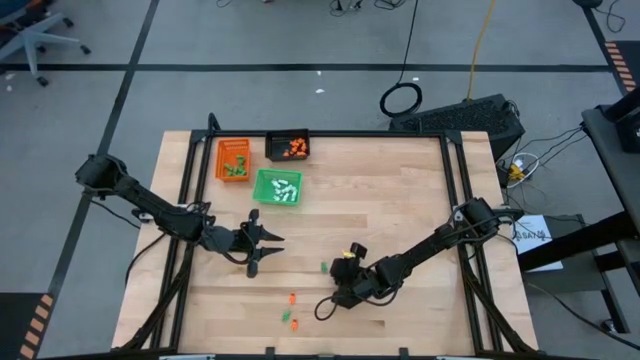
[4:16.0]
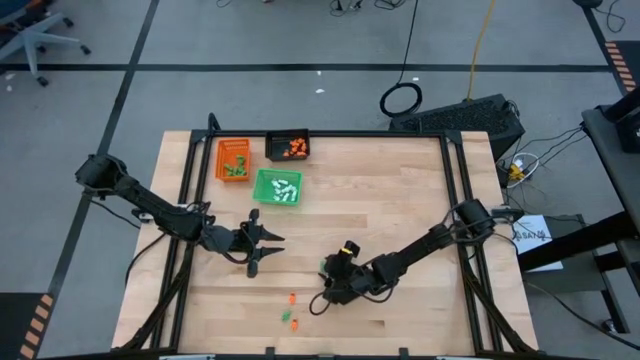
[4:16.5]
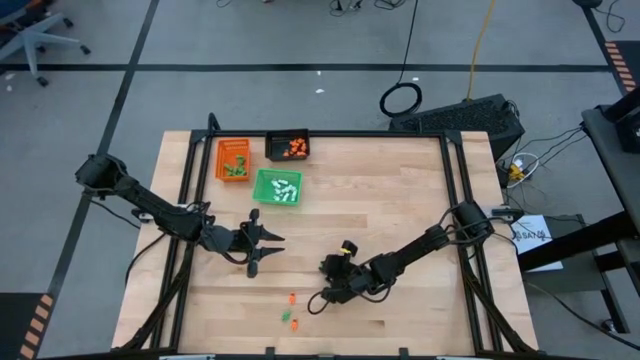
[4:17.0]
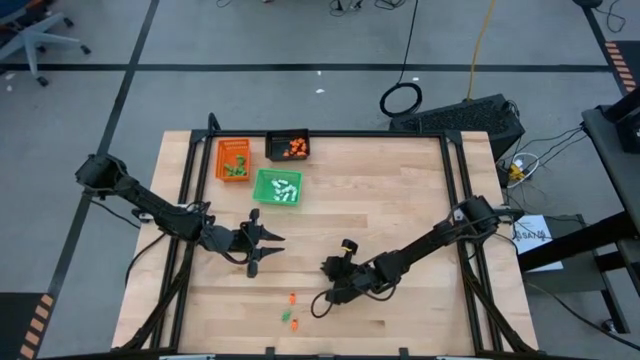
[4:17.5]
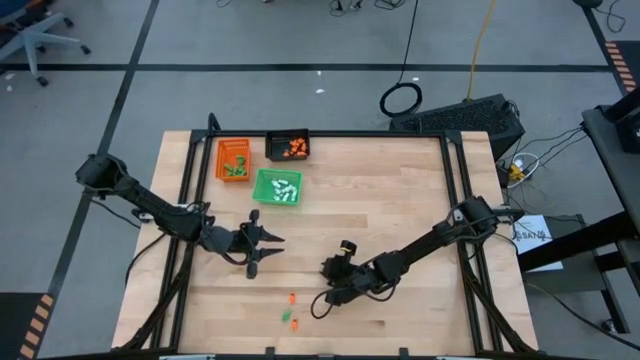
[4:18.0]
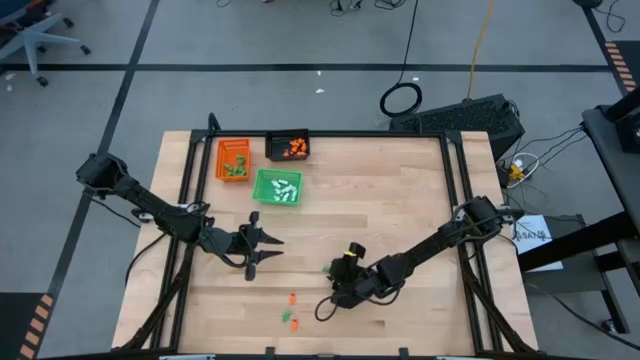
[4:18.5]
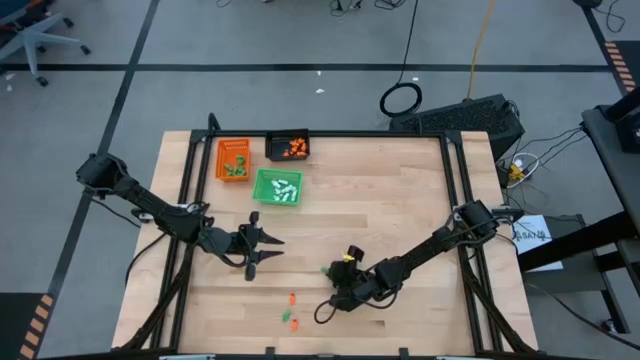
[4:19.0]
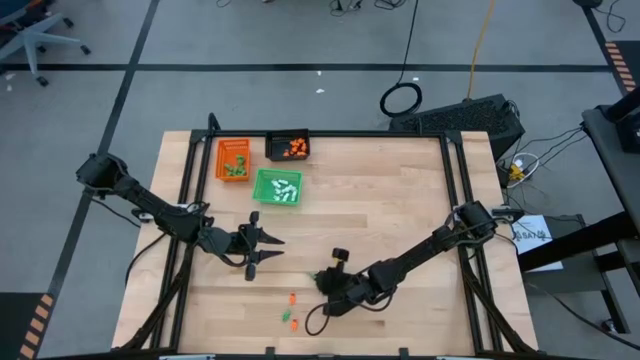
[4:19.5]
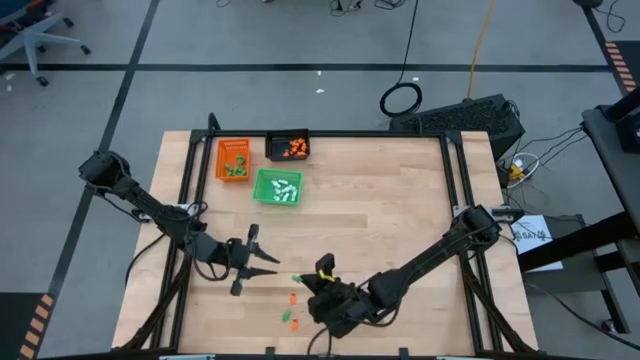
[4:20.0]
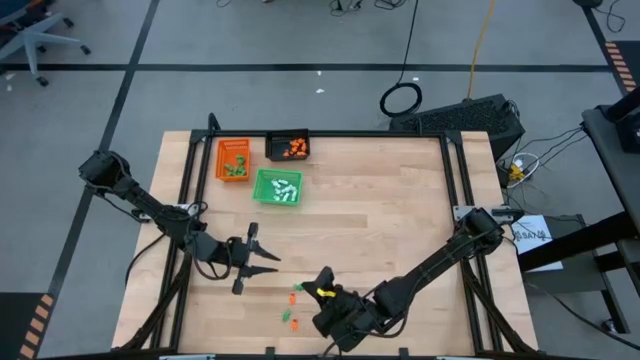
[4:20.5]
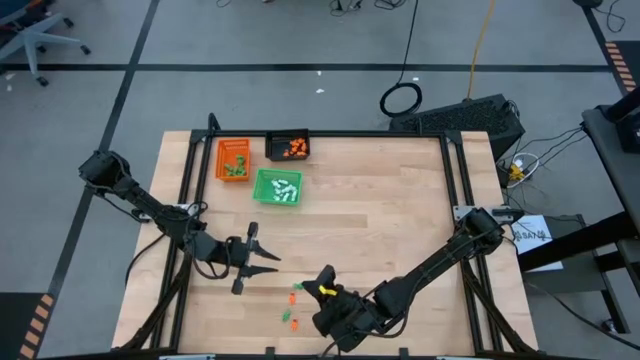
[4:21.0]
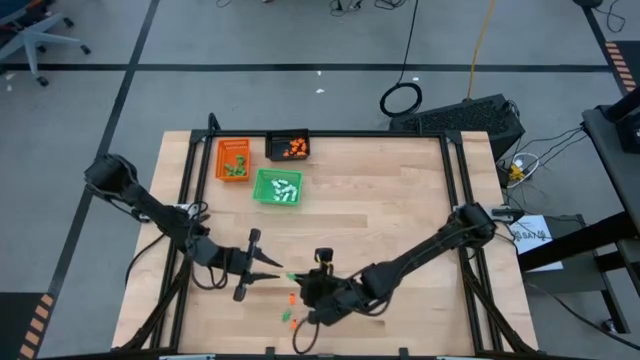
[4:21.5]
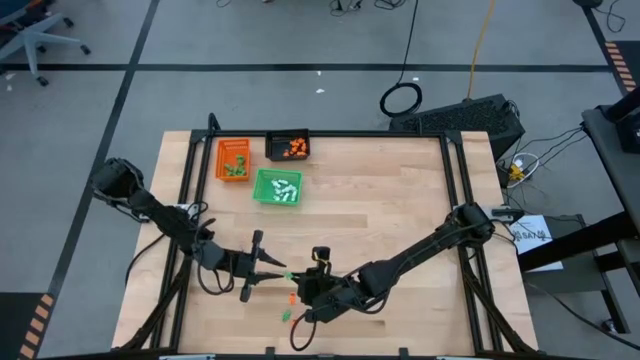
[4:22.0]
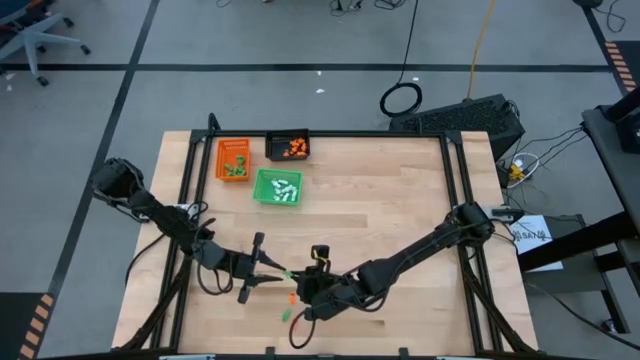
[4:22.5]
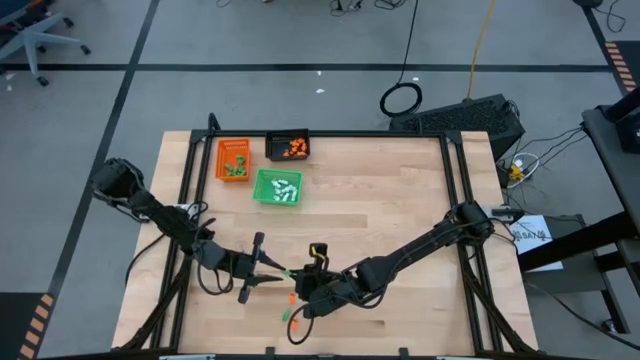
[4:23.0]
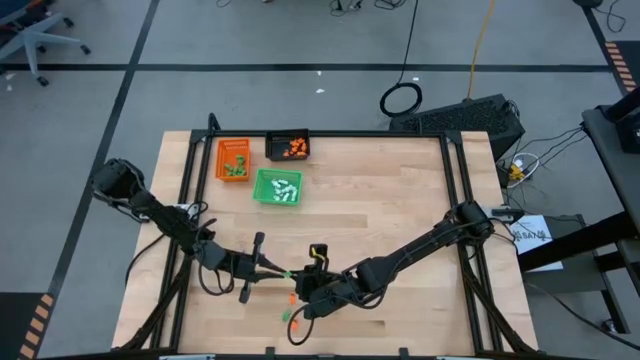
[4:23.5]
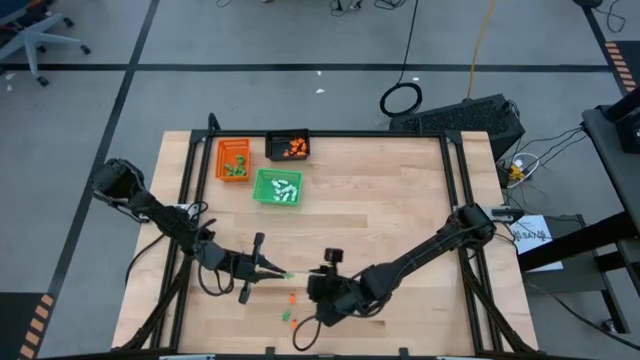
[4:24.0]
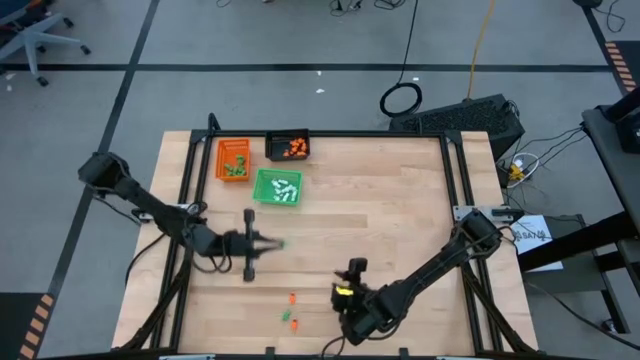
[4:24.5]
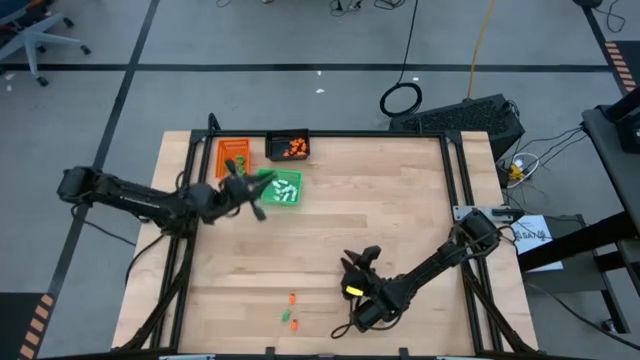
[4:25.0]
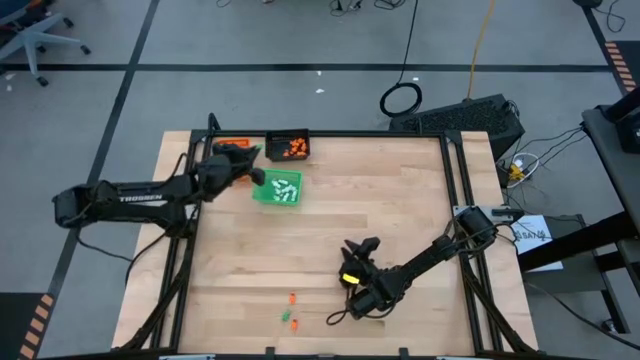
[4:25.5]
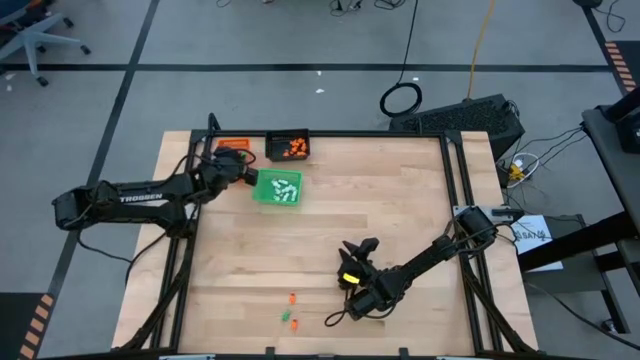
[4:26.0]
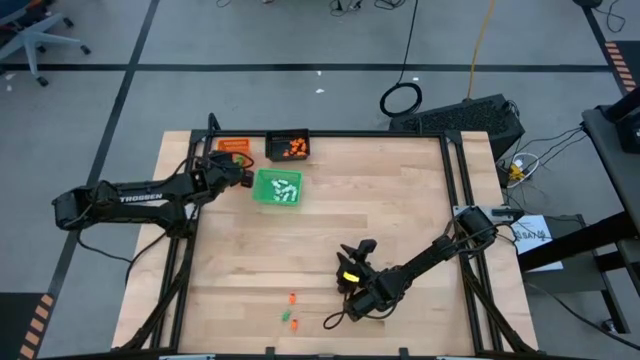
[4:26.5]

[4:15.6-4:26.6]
Task: Sort Halloween decoration
Put the green skeleton toy into the orange bin

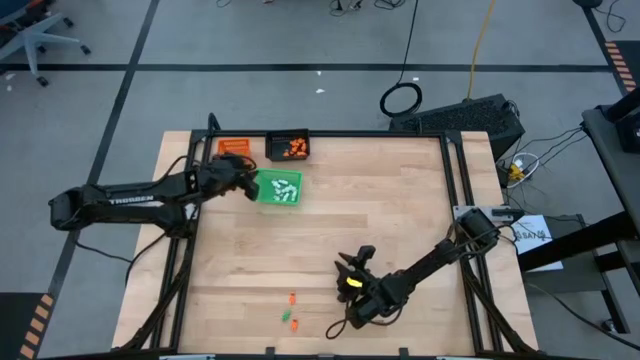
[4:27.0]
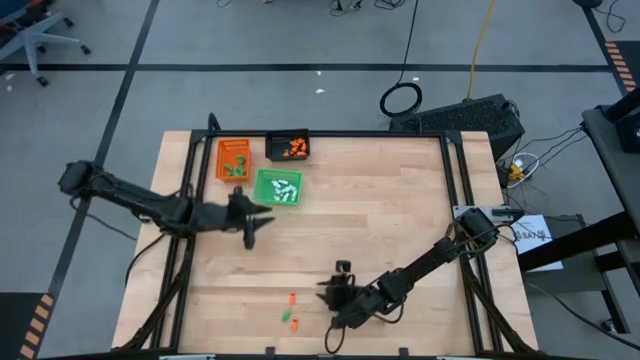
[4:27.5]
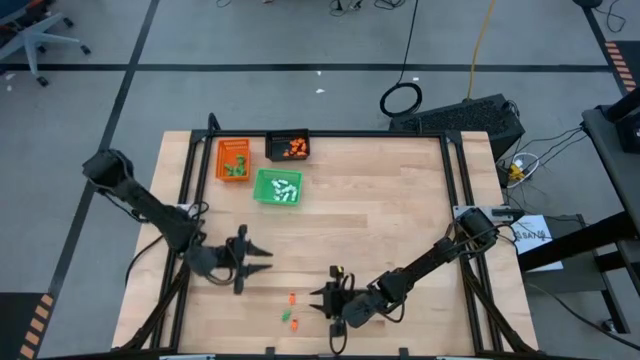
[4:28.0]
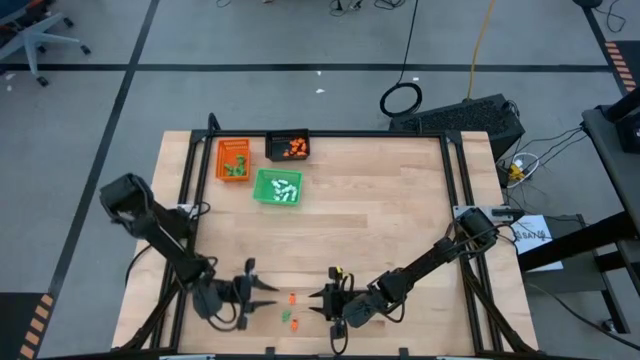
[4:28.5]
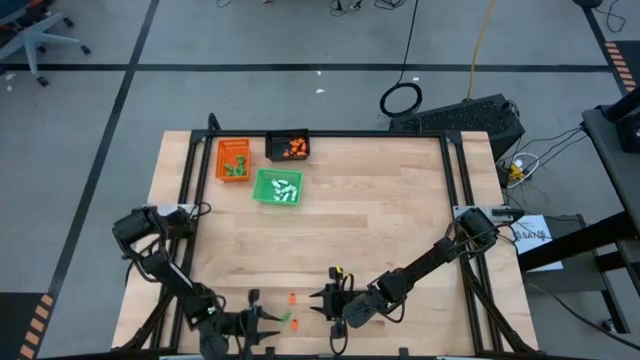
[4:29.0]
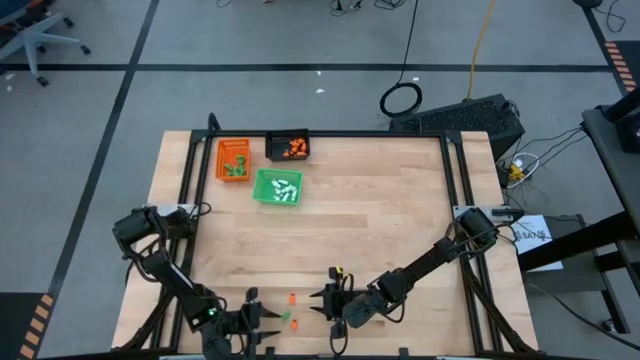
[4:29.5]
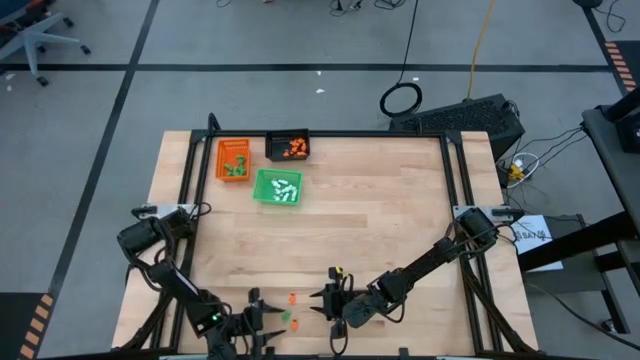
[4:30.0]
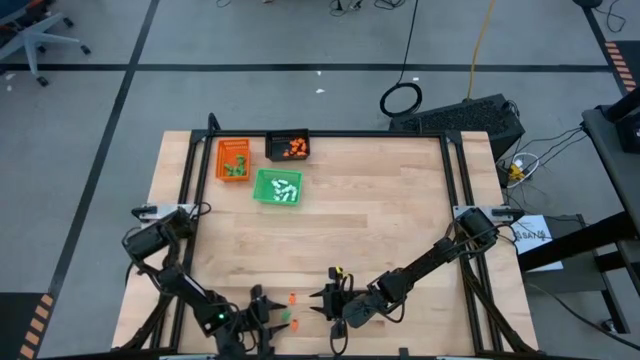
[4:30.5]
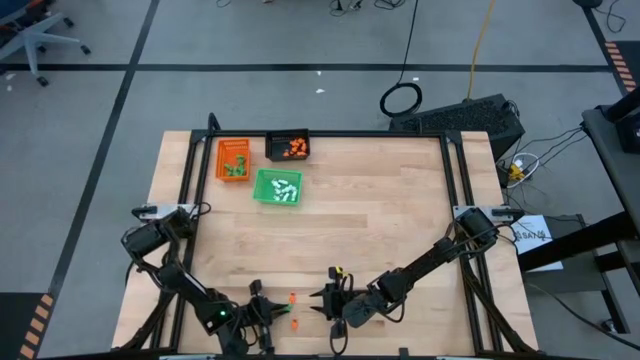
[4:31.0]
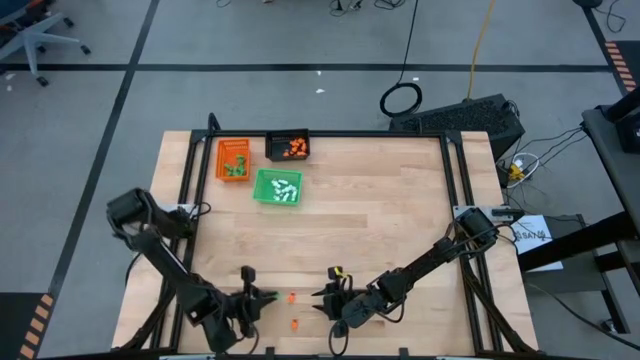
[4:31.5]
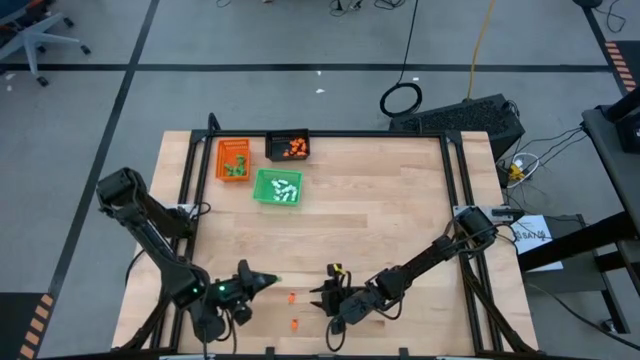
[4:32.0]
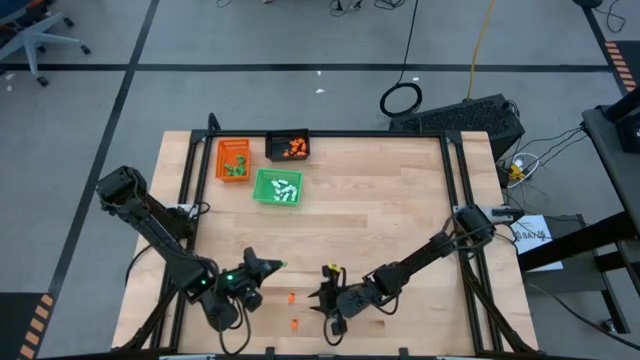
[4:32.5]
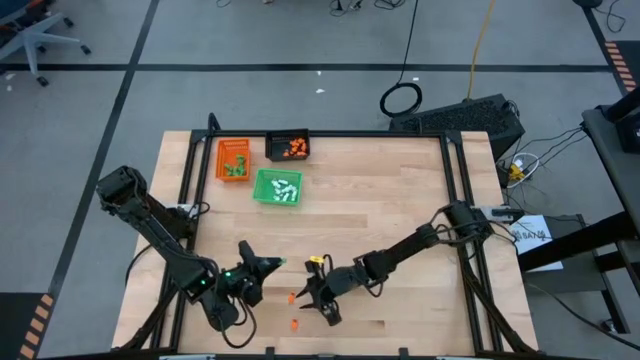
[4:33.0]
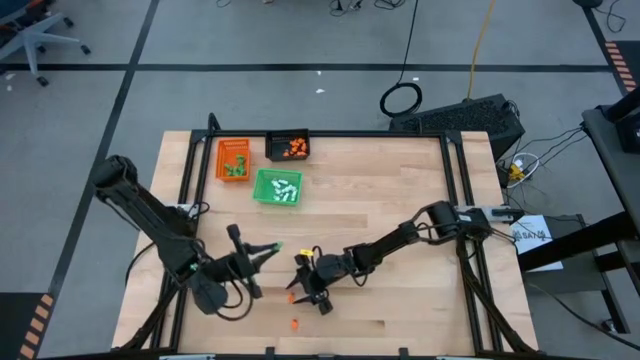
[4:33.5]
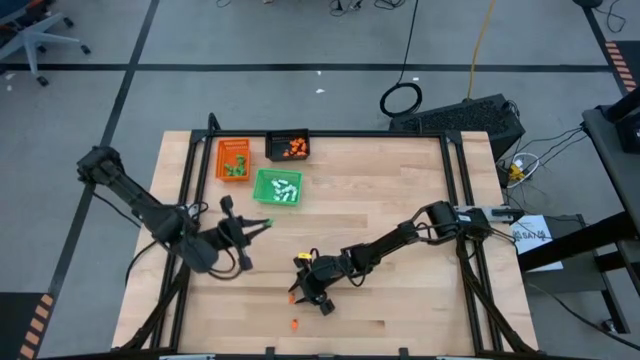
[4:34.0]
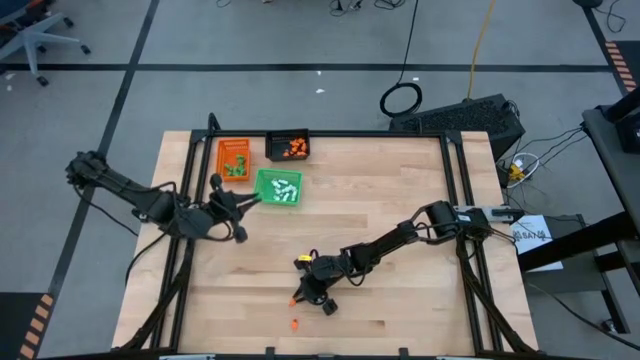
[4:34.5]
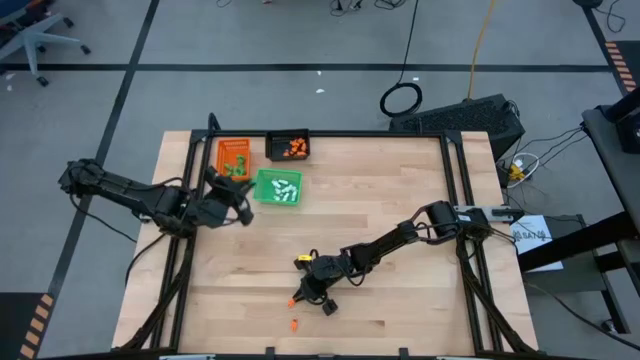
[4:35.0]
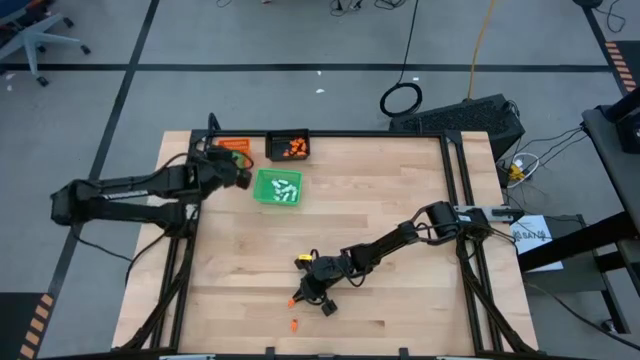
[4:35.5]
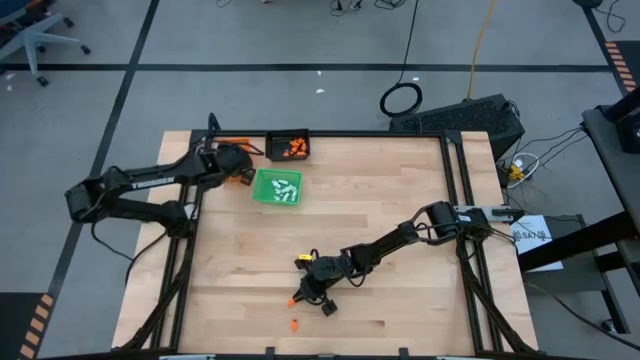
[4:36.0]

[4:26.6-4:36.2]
Put the green skeleton toy into the orange bin
